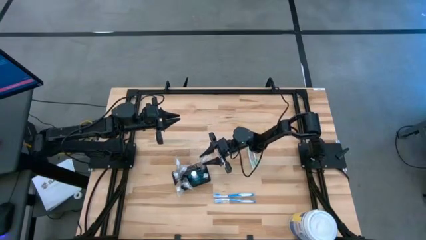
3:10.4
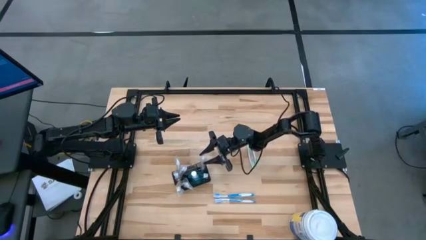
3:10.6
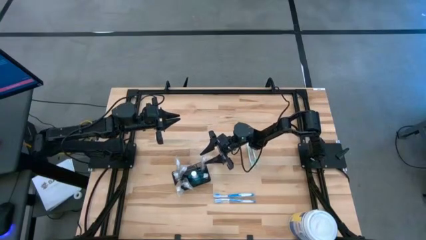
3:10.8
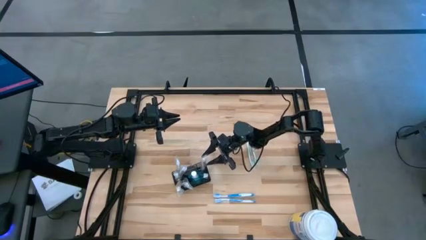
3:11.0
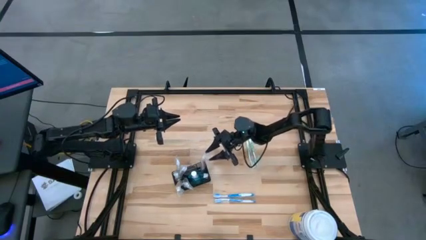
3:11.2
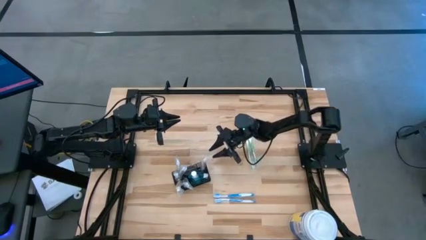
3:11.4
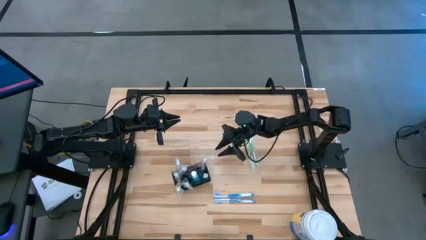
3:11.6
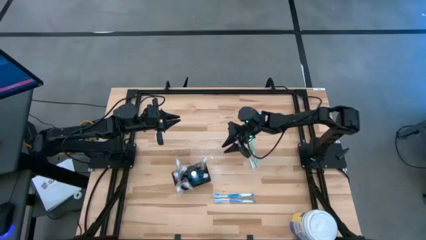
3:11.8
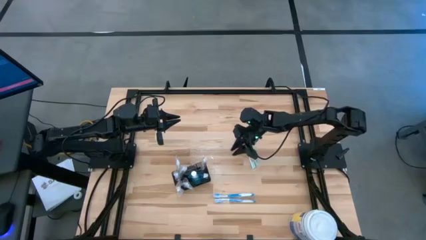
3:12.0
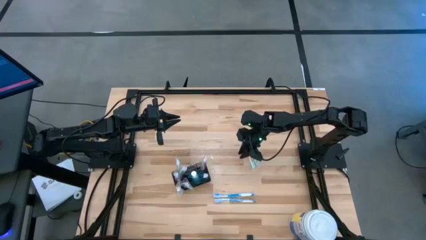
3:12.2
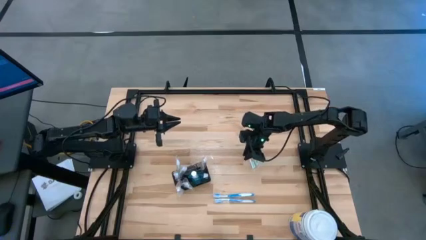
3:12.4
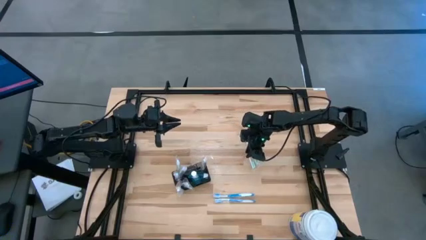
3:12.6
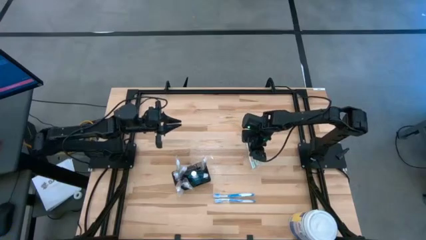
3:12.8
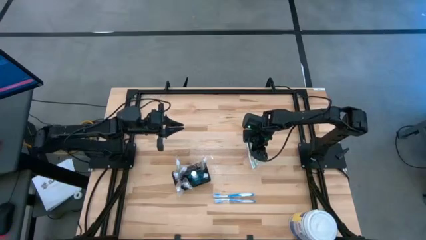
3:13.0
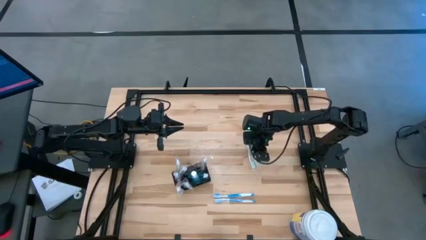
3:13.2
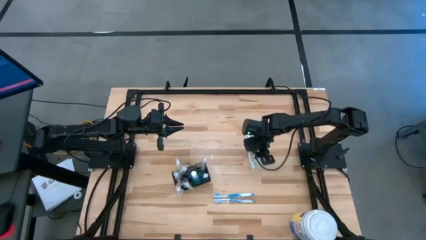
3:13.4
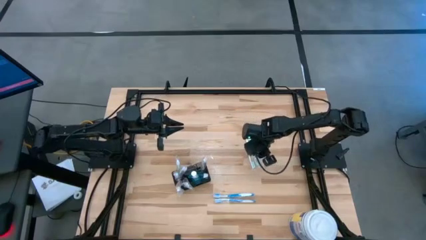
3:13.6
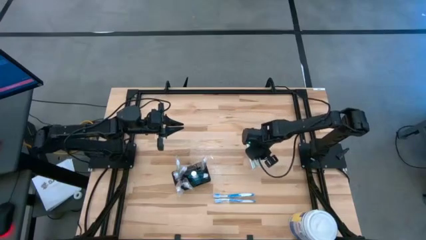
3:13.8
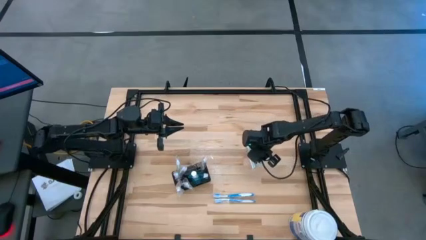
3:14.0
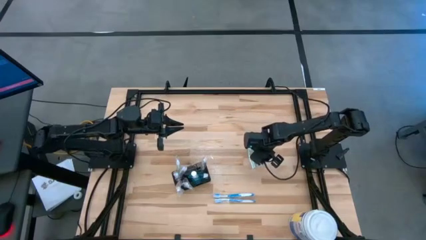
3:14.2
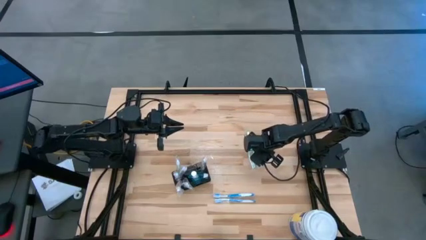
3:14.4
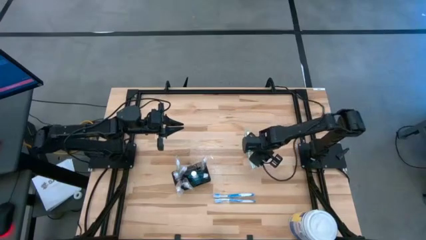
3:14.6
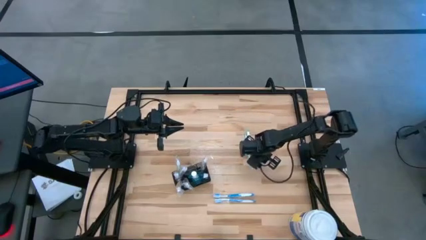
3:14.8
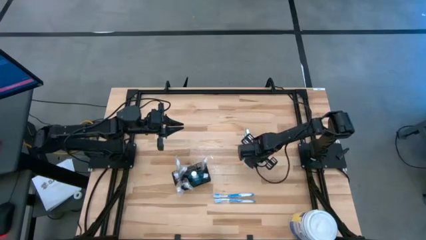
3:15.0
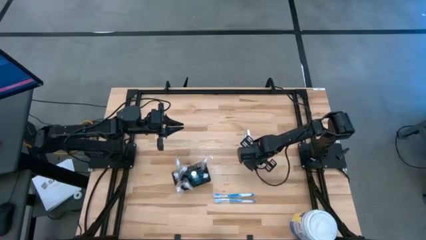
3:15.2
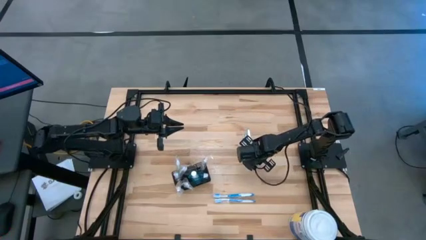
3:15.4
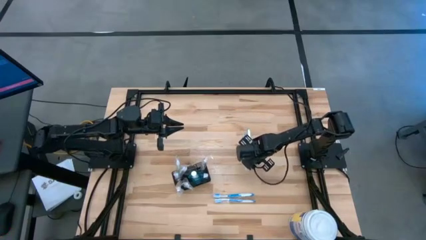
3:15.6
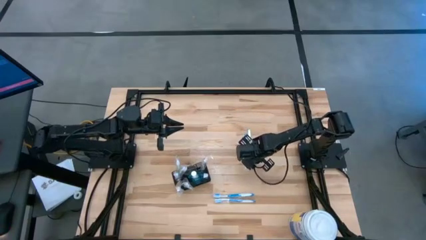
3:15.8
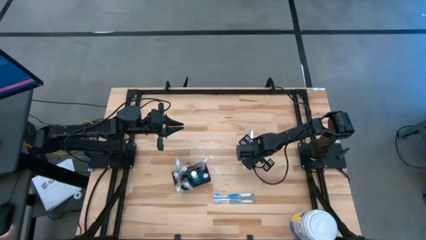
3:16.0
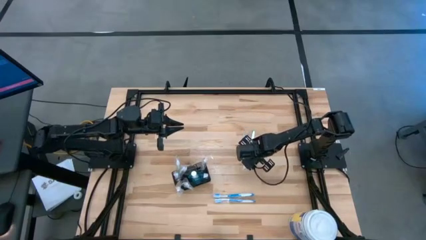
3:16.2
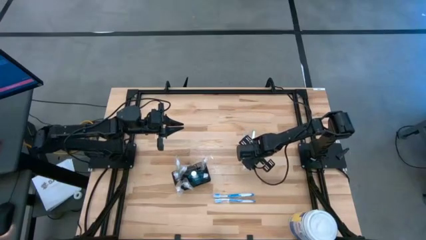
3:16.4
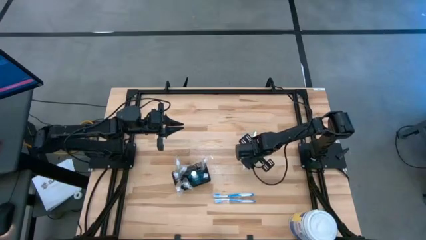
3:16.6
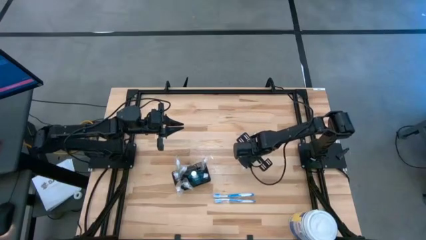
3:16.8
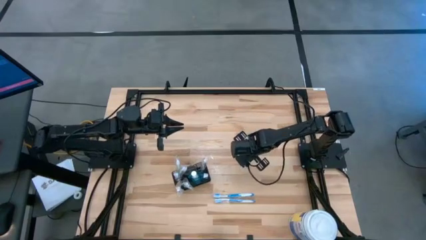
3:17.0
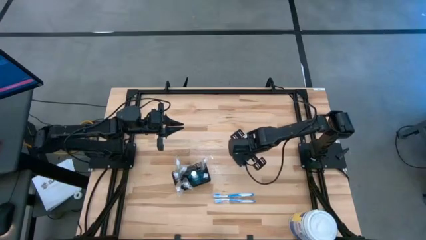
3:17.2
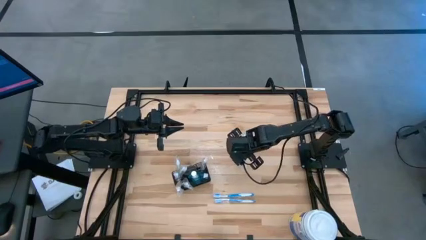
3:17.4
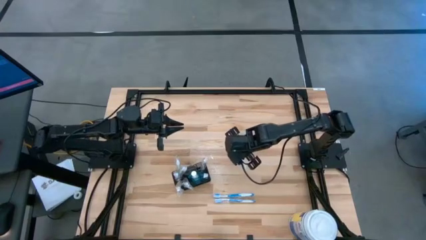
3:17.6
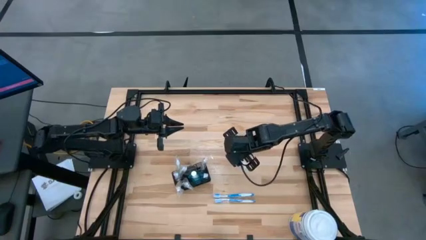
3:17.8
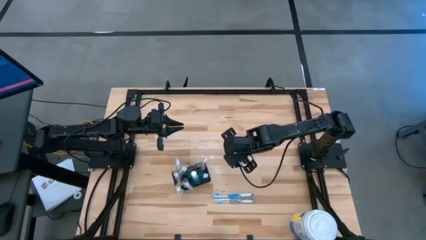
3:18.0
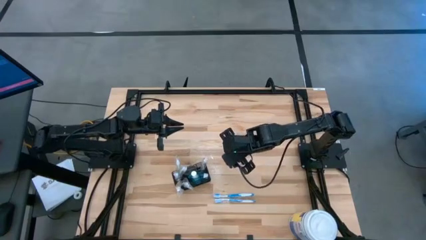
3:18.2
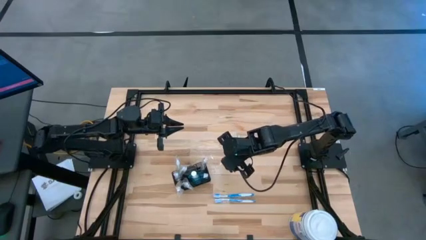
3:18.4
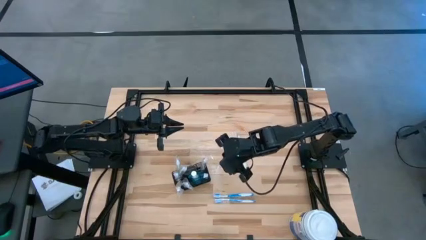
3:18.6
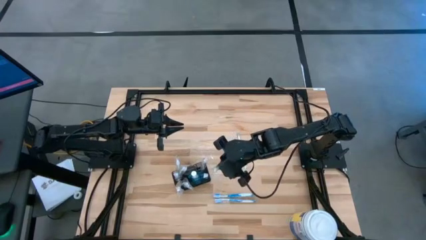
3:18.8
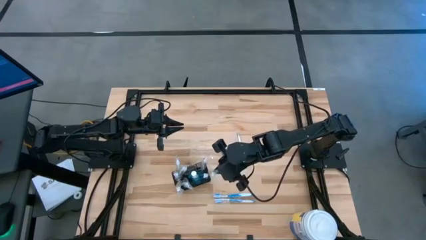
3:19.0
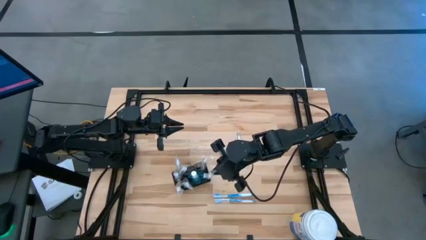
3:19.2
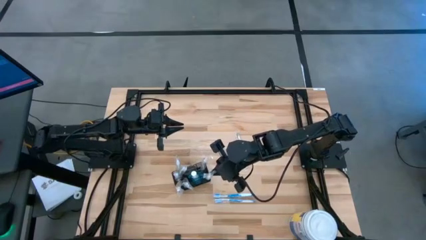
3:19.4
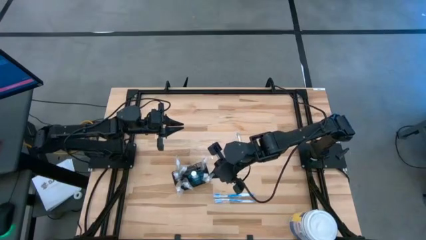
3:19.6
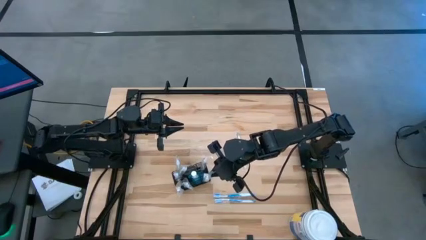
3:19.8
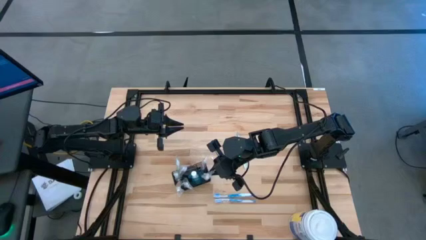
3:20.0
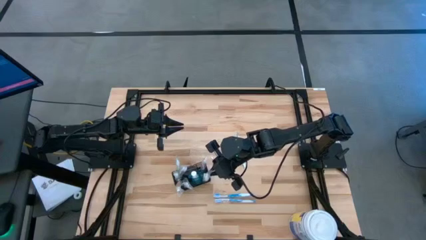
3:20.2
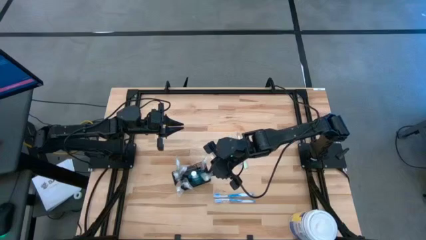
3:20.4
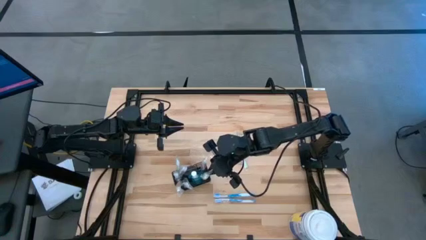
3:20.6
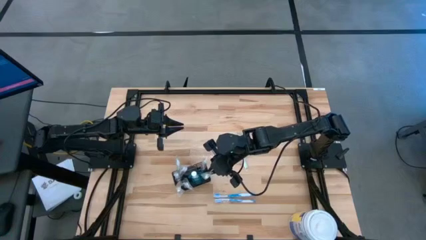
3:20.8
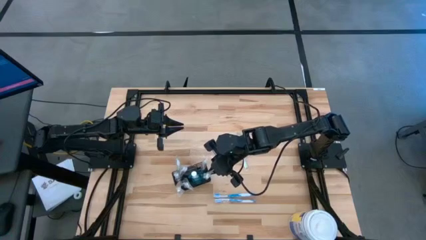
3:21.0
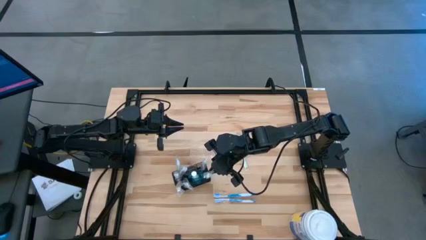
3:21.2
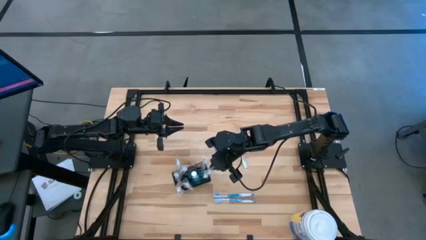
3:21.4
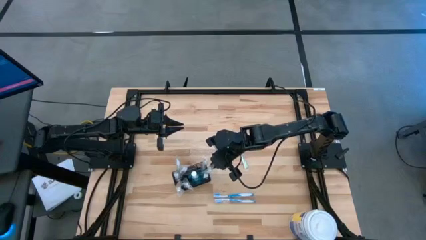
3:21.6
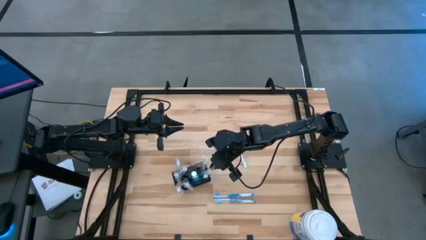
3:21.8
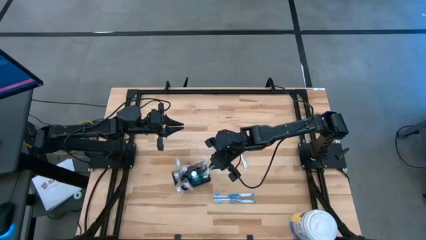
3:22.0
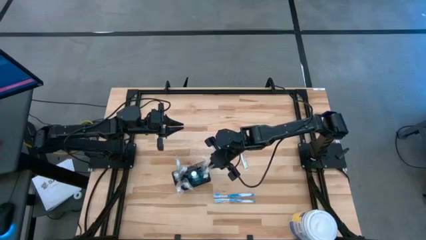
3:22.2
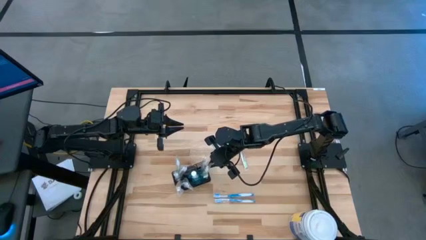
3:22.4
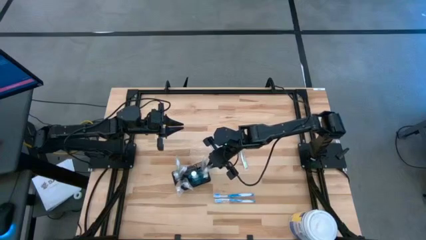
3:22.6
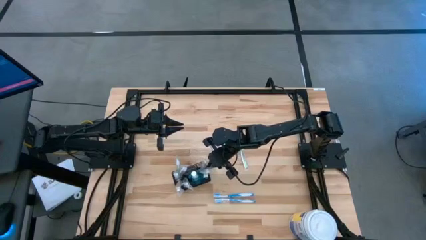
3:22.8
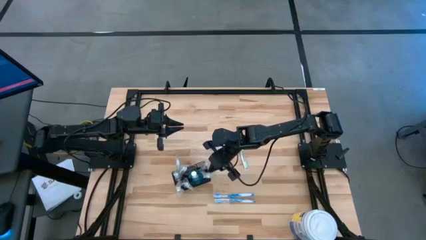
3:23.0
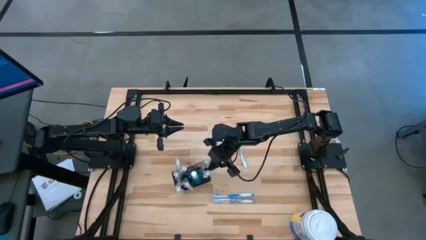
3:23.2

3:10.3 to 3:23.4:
Task: Pick & Place toothbrushing station
Put the white green toothbrush into the black toothbrush rack

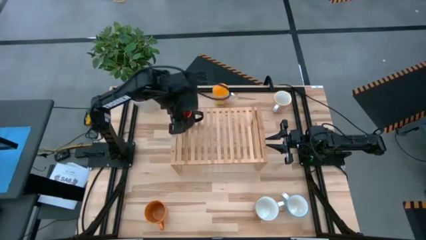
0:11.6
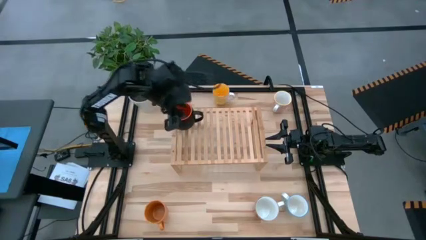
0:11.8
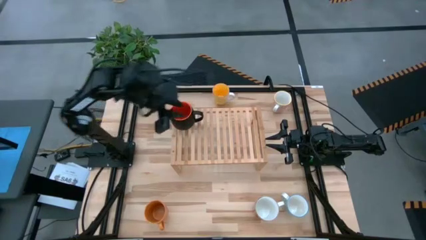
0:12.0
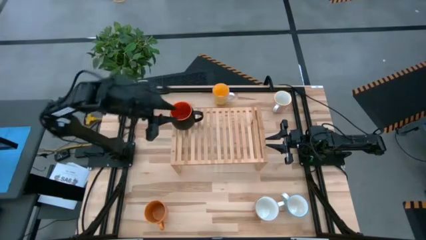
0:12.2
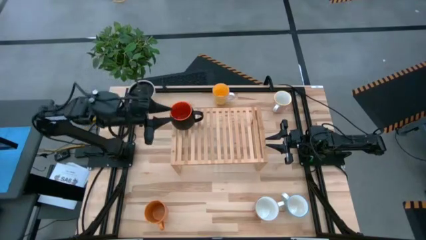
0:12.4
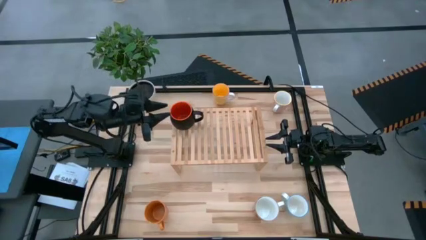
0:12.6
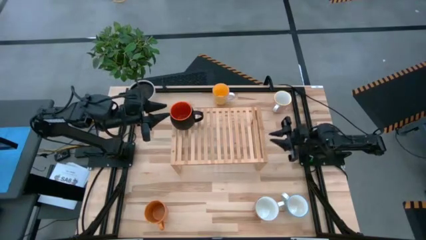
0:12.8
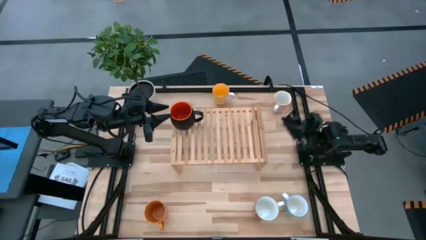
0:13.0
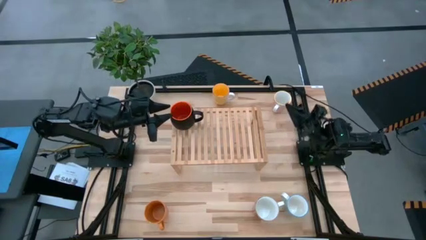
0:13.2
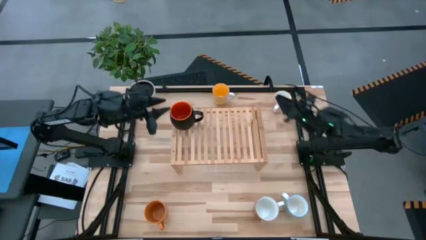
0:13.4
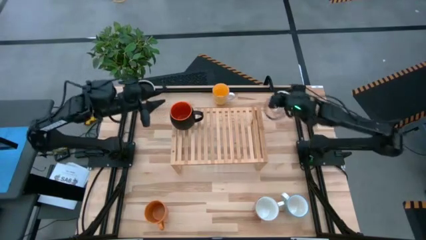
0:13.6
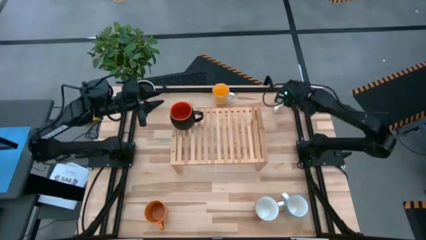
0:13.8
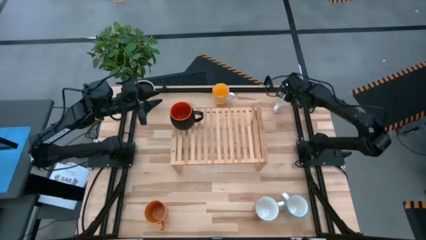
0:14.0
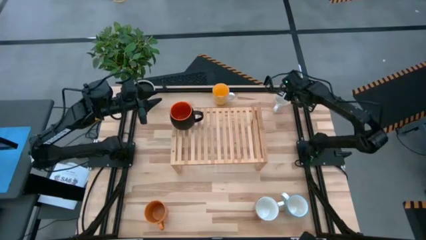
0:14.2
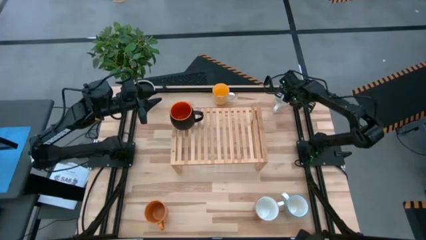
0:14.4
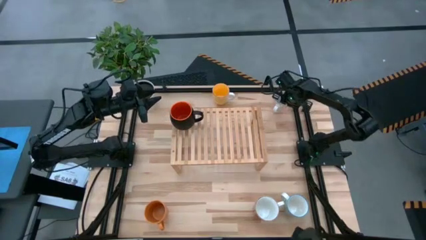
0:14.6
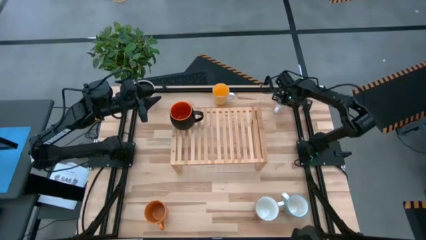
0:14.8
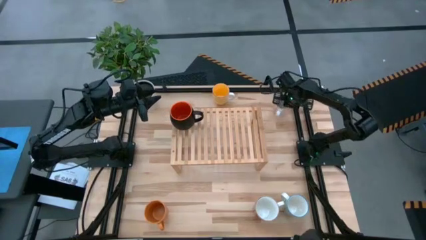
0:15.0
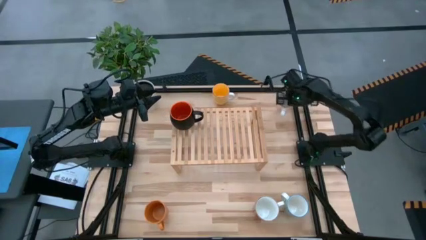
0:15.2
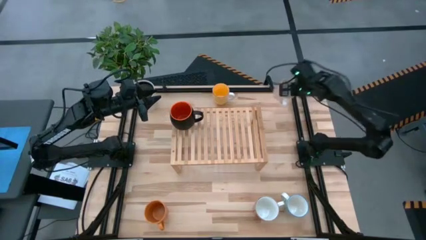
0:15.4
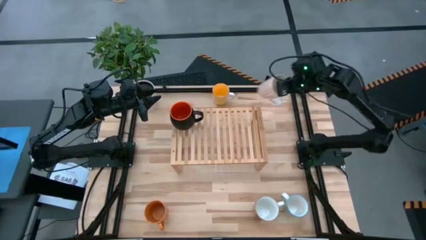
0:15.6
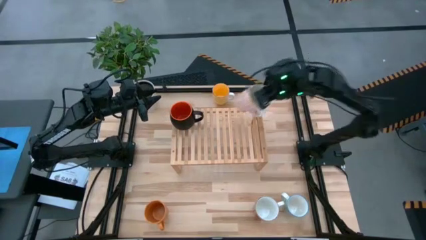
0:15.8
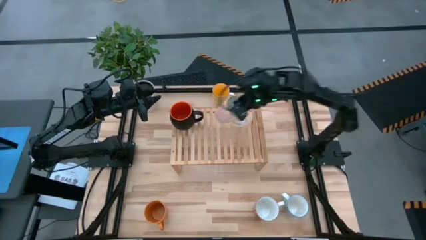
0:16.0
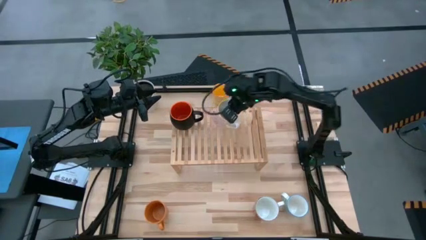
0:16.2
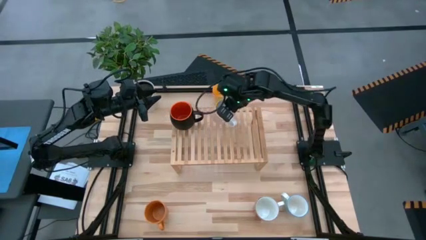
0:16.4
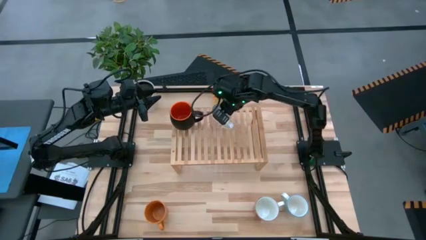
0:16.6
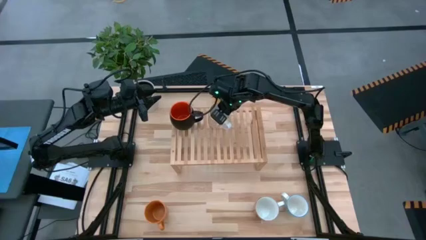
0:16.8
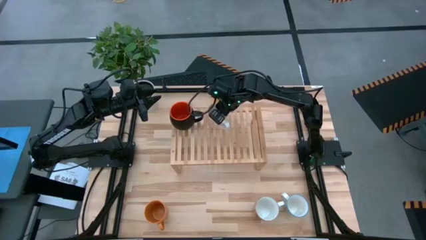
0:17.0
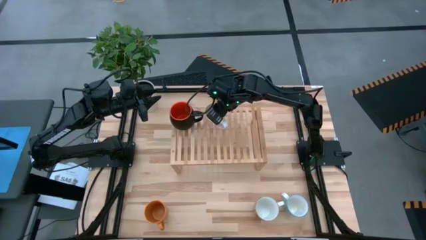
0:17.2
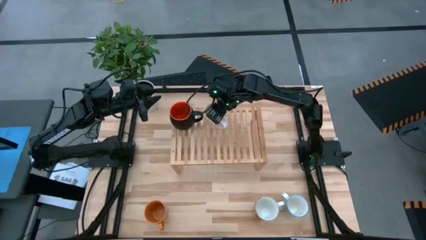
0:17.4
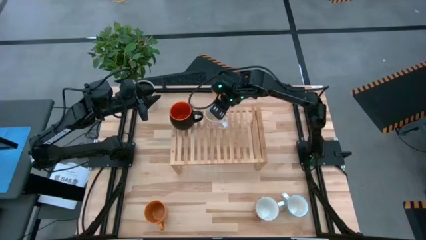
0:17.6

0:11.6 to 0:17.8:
Task: Place coffee mugs
Put the white and yellow mug on the shelf
